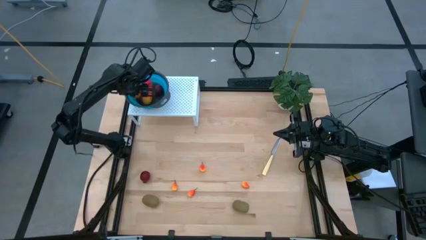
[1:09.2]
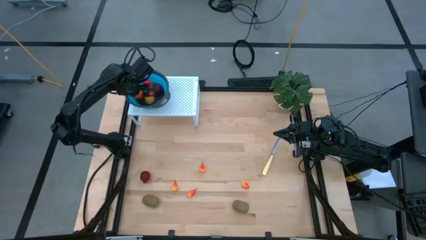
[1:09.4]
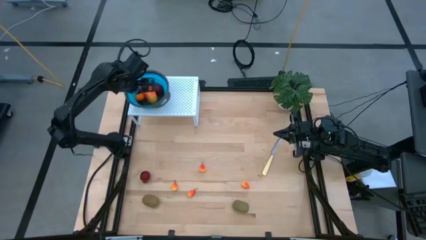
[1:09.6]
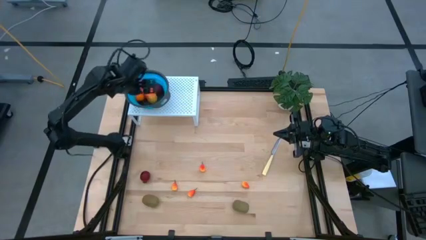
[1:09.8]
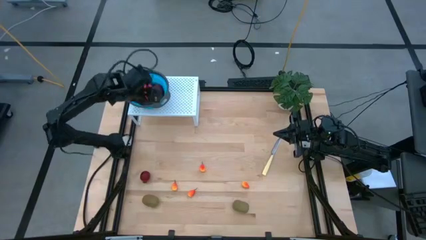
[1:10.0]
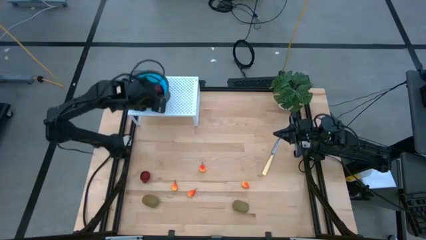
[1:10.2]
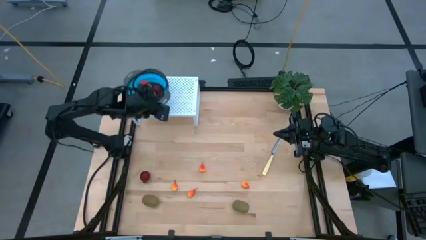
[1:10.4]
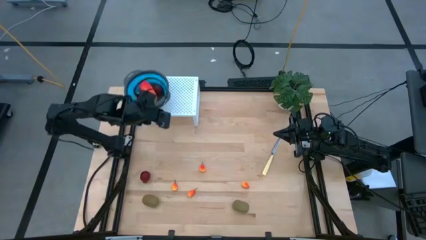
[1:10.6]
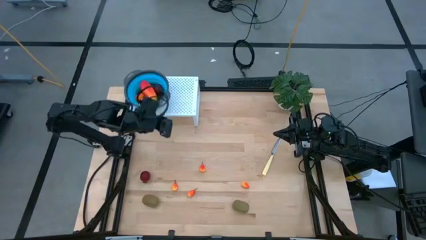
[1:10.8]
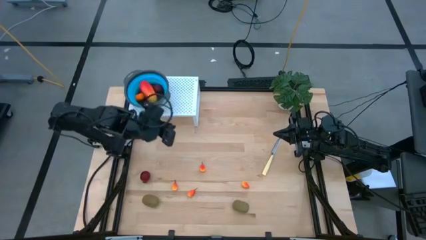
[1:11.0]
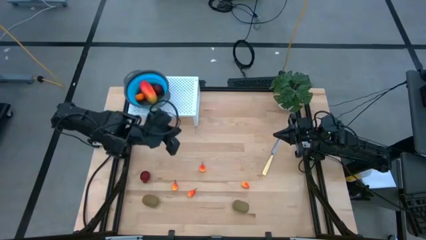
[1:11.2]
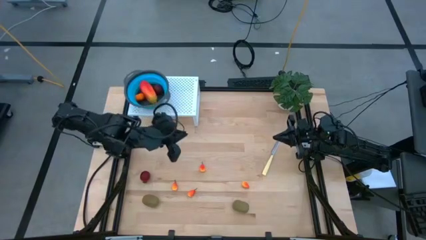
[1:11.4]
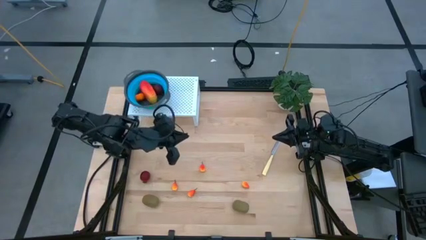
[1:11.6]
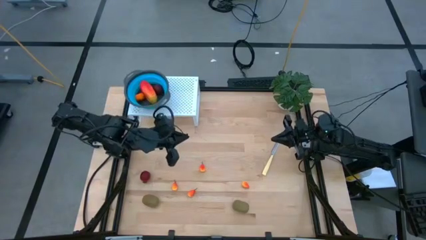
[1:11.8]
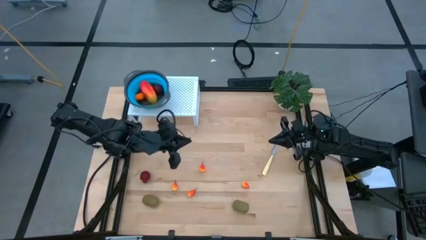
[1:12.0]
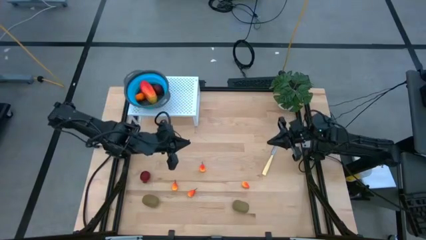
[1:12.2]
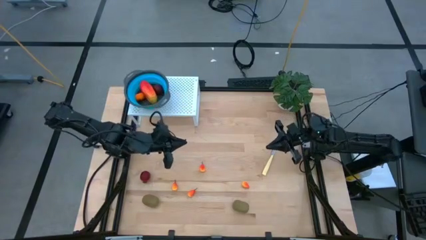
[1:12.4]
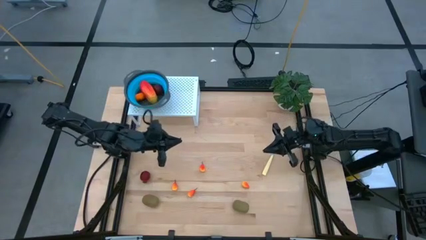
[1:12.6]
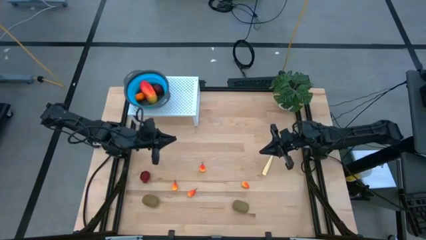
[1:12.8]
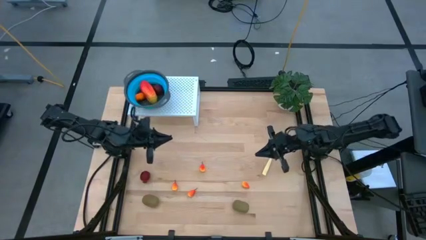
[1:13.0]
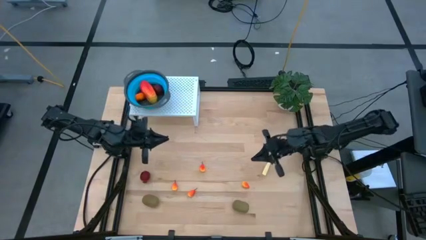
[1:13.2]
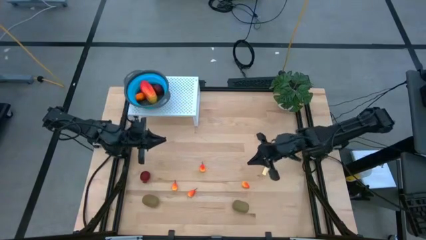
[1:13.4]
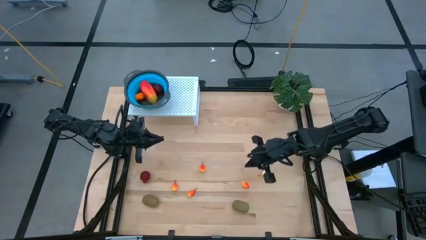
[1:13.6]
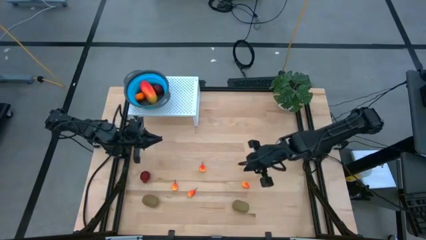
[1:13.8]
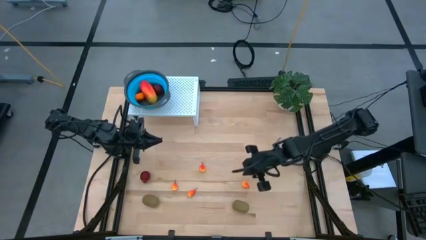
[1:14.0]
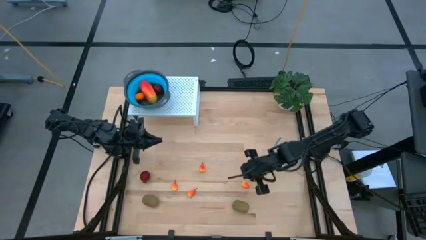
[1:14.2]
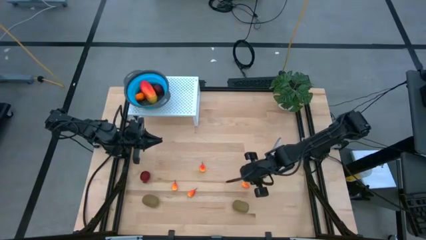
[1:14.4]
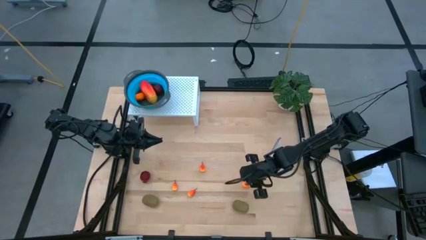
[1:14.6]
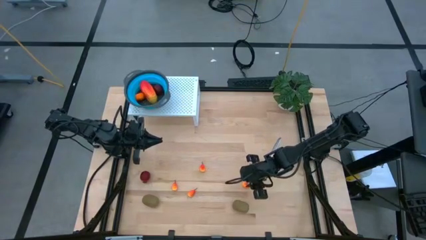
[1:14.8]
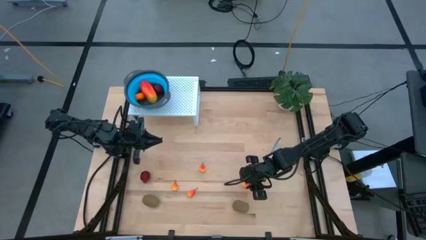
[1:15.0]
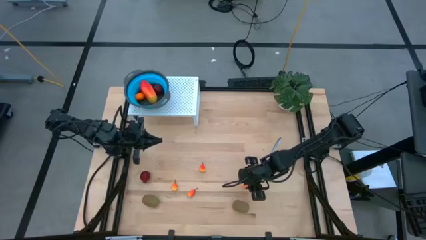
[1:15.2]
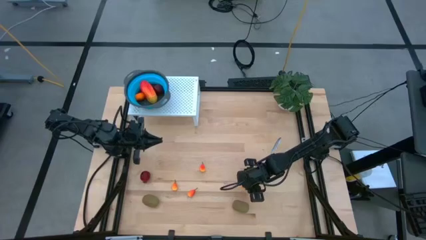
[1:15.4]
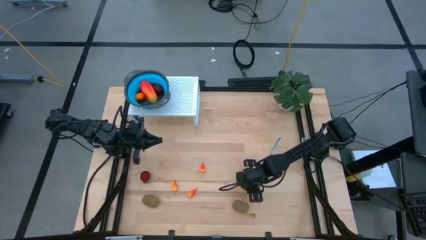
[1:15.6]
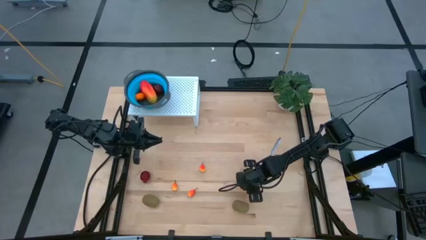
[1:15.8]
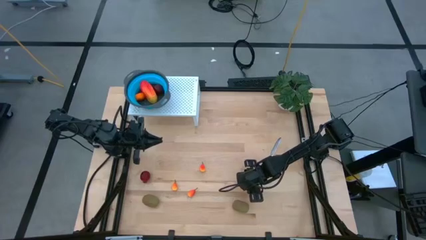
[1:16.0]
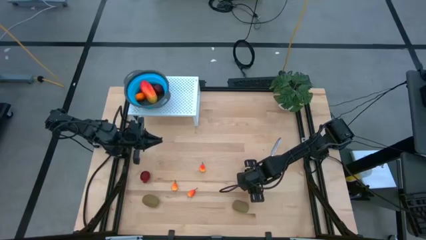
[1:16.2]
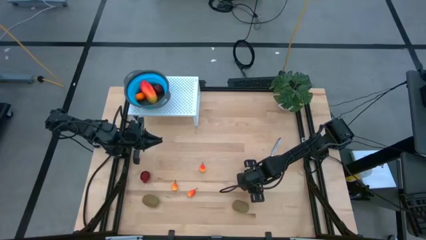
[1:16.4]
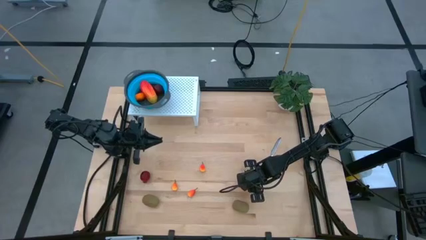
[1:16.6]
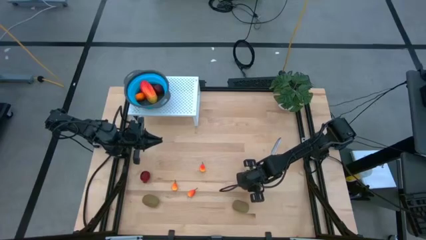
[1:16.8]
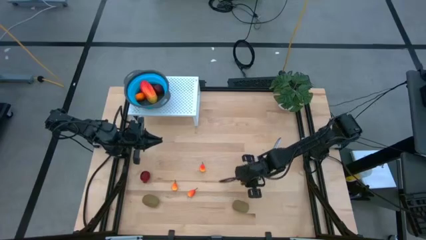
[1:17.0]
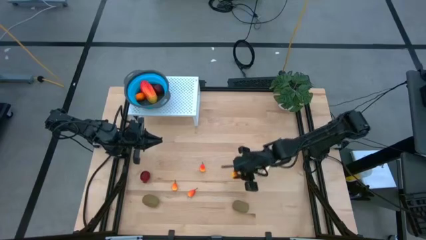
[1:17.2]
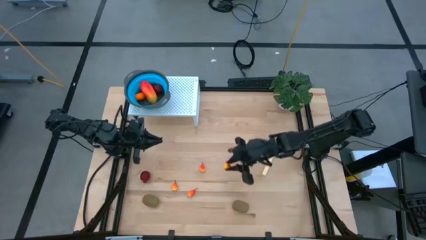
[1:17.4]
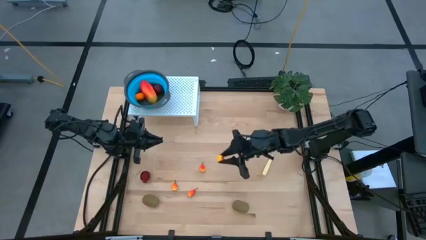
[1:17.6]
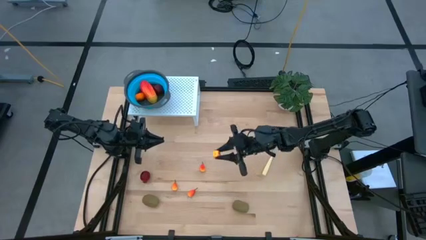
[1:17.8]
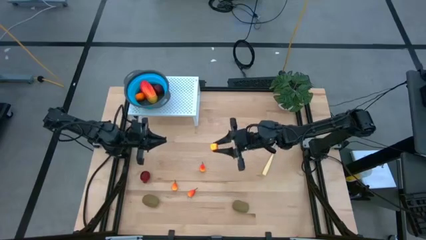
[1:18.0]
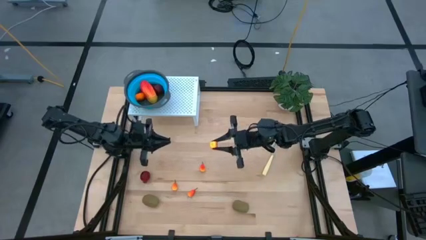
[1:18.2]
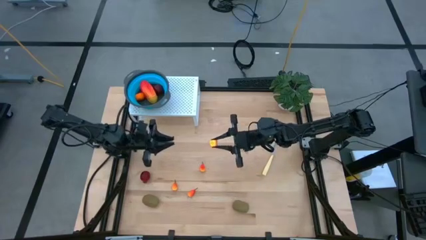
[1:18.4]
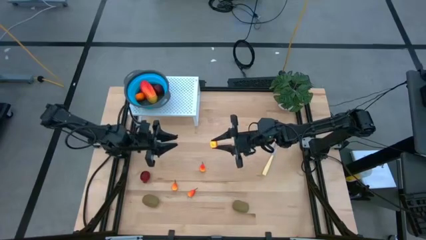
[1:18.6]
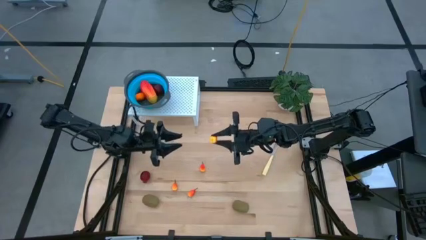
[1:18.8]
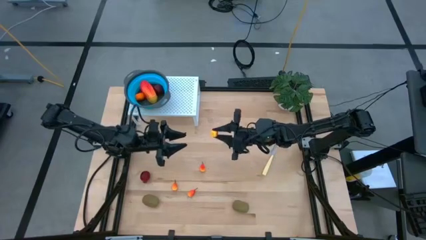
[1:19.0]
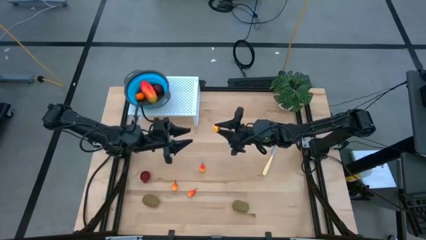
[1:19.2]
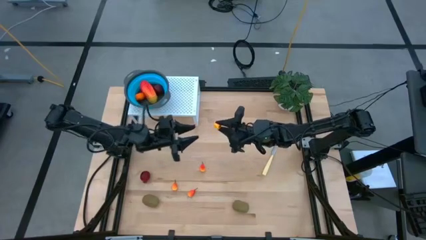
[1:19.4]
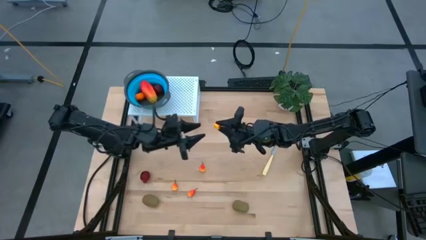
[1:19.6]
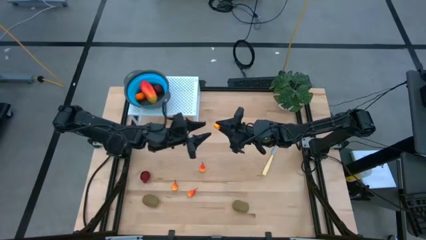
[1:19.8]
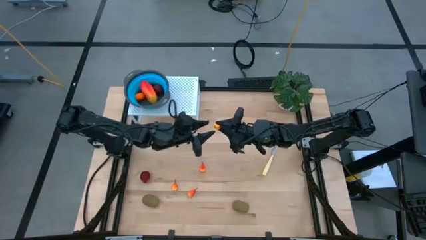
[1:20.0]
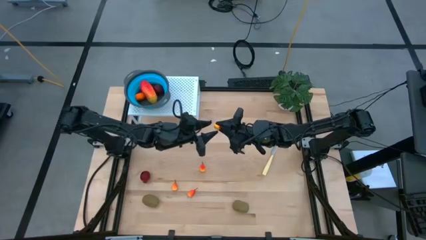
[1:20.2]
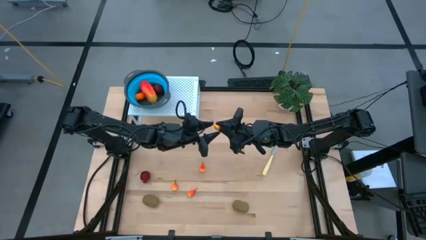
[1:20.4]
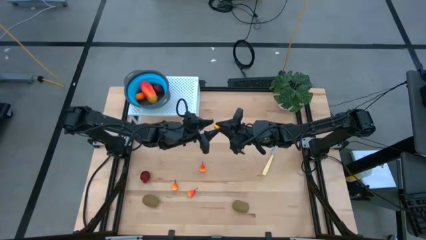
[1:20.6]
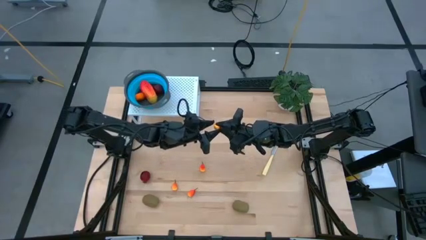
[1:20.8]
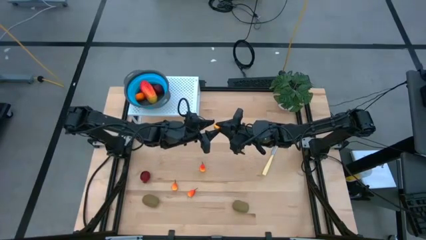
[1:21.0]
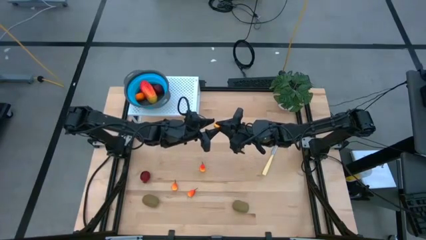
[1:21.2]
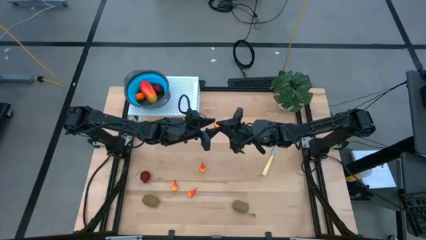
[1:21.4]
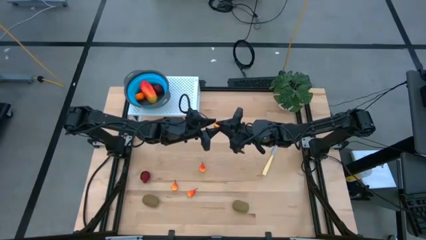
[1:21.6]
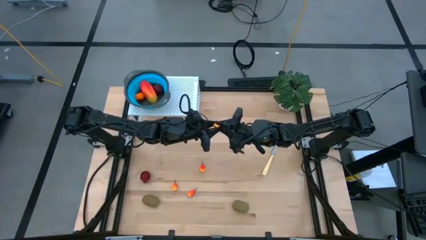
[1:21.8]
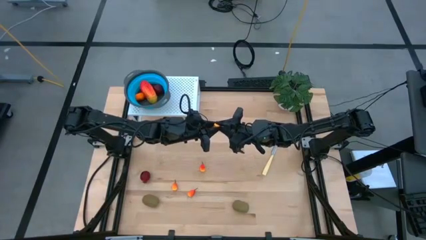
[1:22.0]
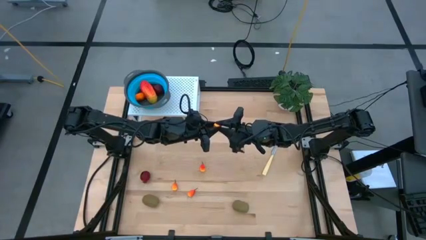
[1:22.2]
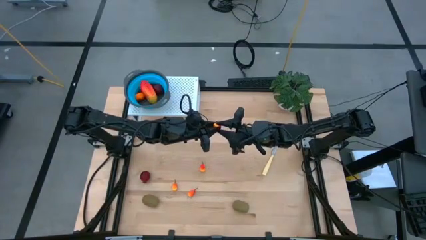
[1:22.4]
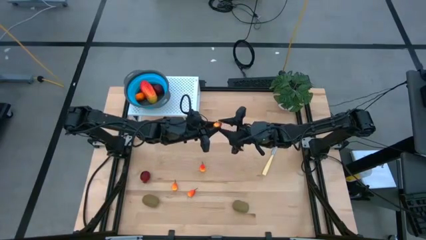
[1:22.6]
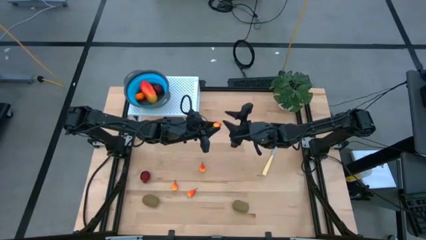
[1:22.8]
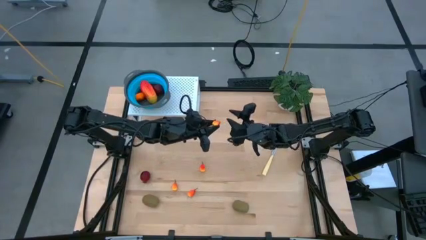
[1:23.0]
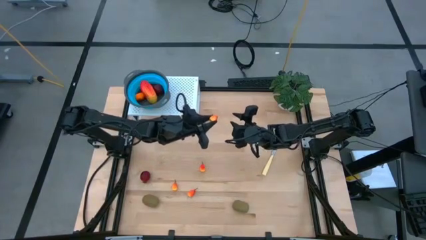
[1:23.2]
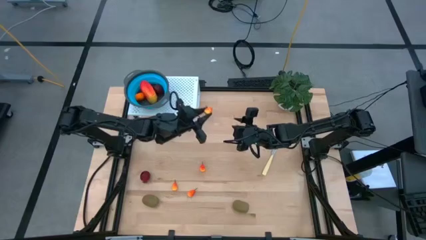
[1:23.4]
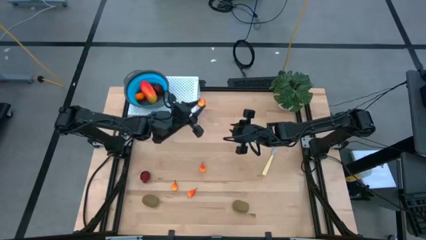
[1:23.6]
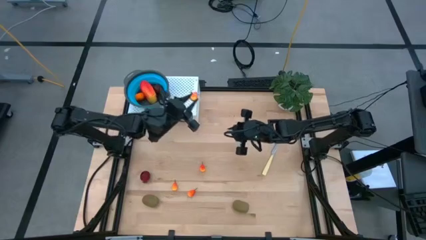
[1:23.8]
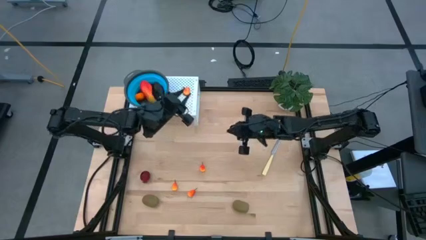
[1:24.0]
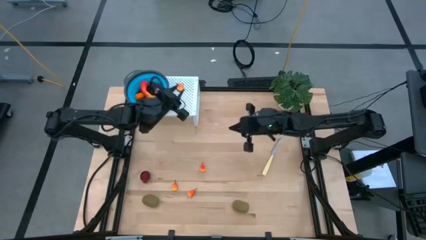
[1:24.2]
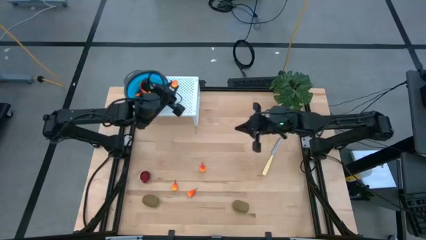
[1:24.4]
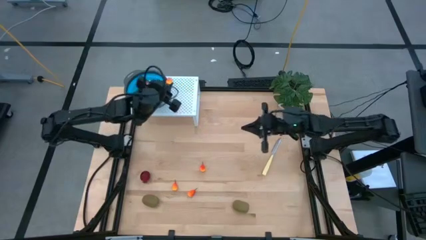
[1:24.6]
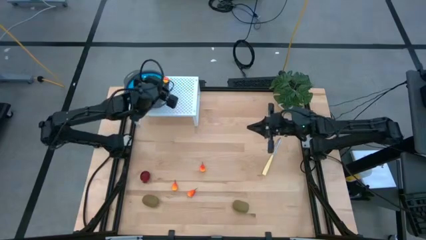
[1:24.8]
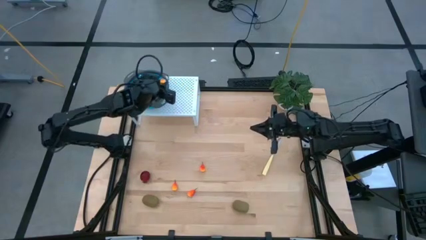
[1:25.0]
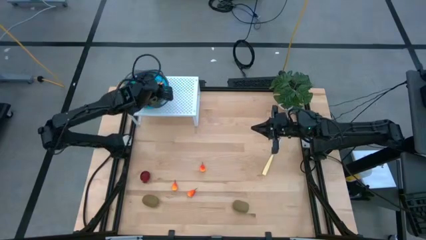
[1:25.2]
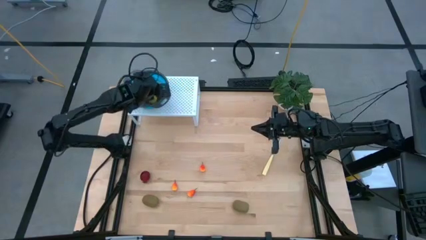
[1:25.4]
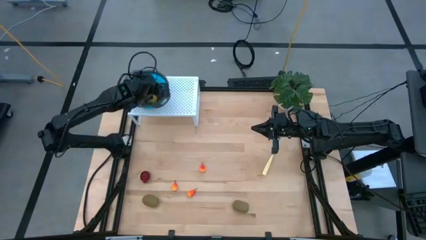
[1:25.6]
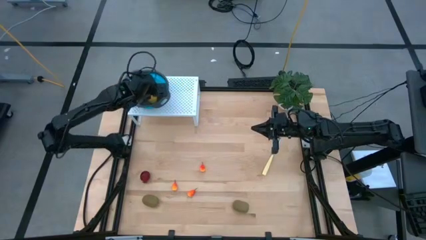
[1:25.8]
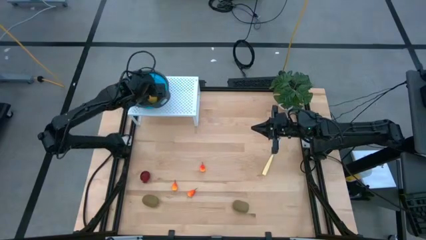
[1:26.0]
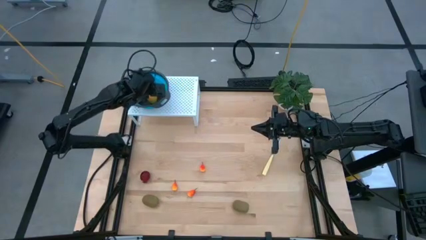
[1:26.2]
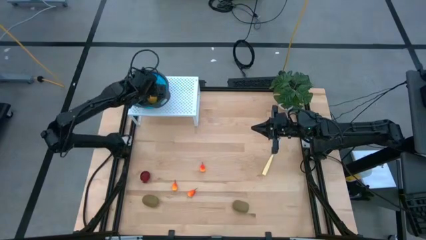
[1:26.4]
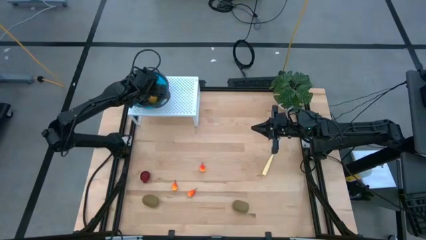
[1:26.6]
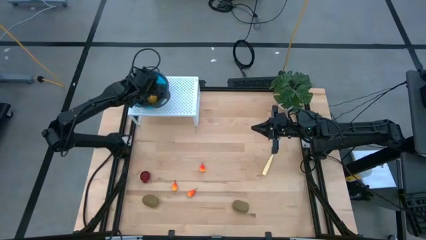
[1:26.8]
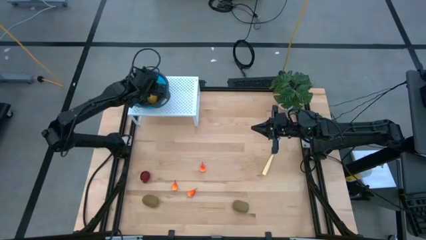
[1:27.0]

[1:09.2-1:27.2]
Task: Pick & Place Fruit
Put the right peach into the blue strainer bowl on the shelf
